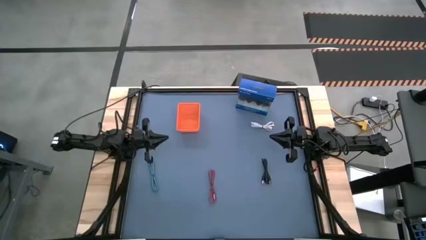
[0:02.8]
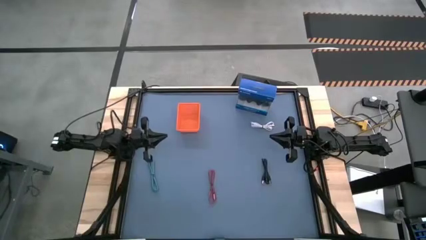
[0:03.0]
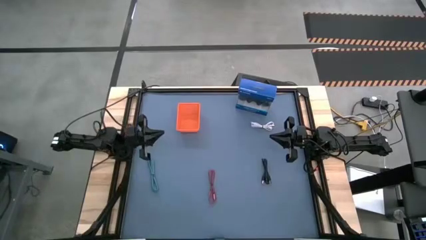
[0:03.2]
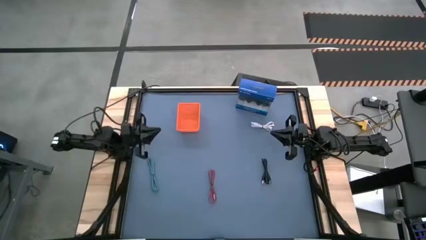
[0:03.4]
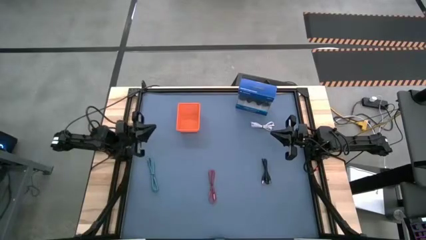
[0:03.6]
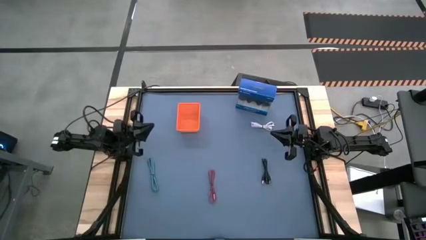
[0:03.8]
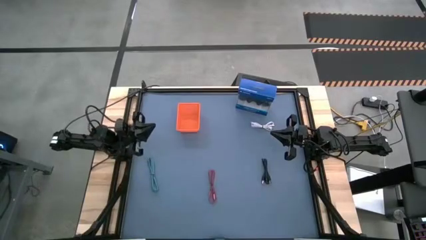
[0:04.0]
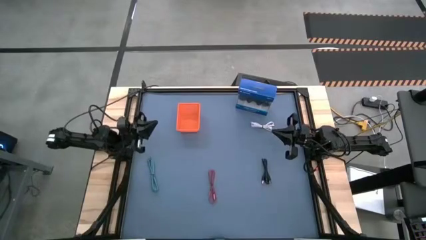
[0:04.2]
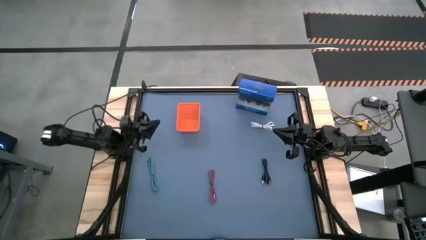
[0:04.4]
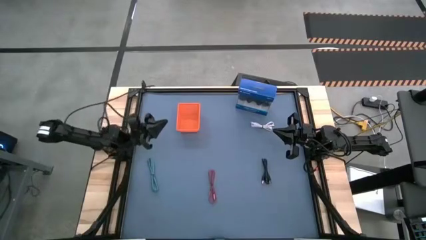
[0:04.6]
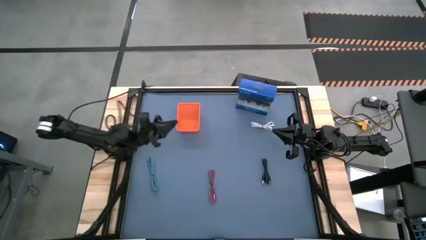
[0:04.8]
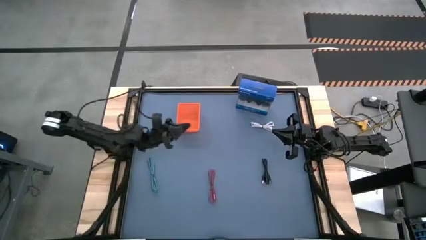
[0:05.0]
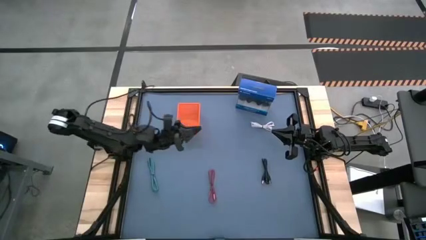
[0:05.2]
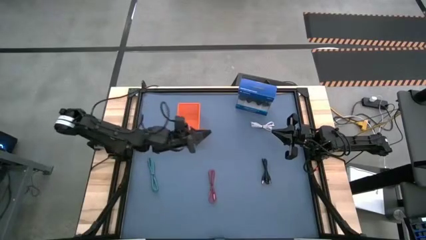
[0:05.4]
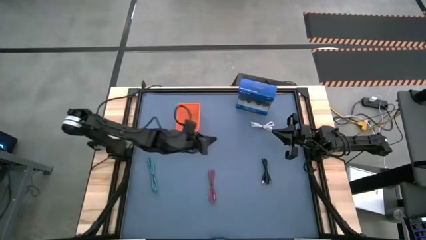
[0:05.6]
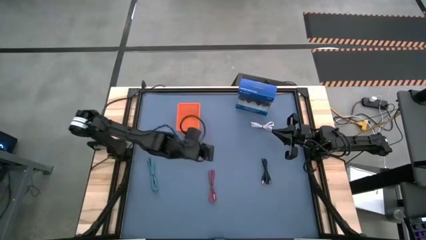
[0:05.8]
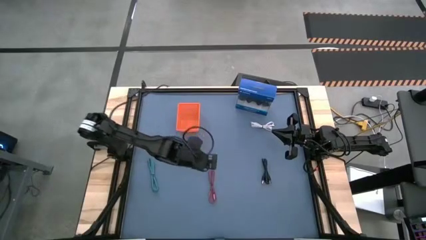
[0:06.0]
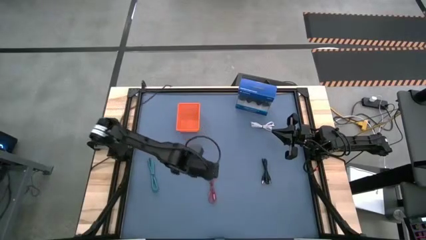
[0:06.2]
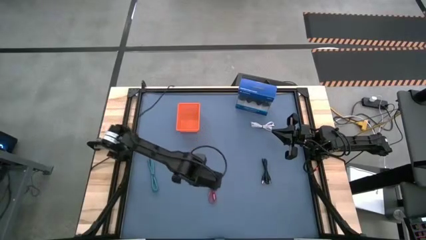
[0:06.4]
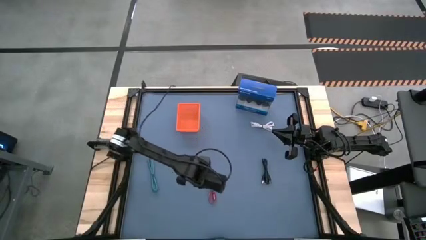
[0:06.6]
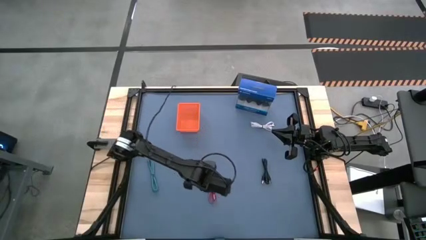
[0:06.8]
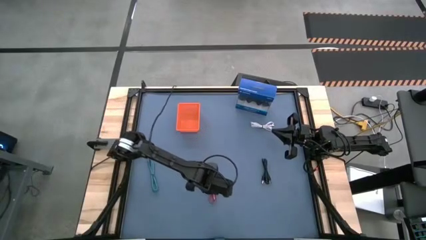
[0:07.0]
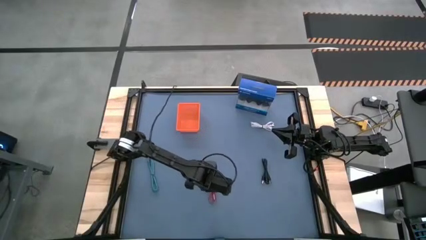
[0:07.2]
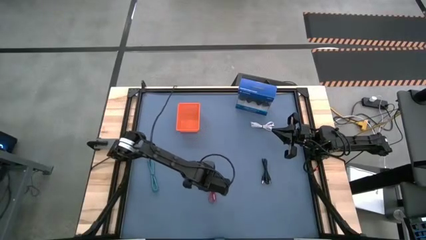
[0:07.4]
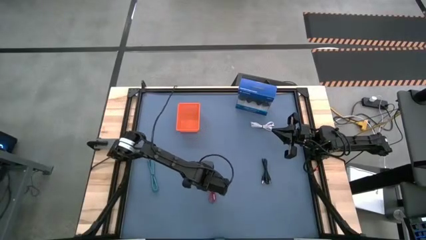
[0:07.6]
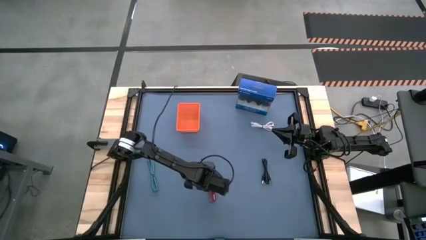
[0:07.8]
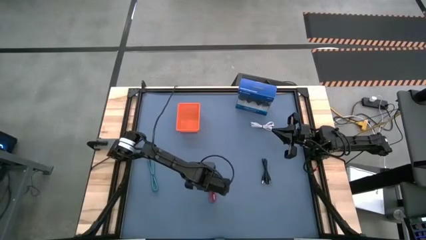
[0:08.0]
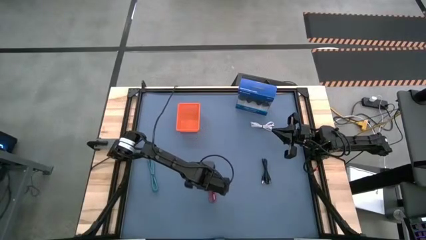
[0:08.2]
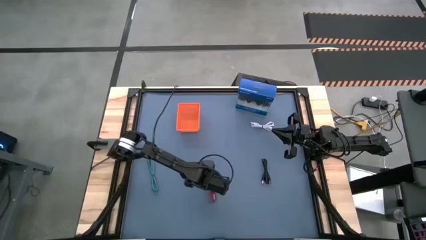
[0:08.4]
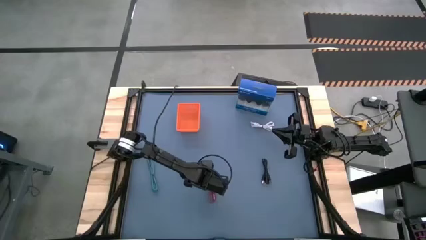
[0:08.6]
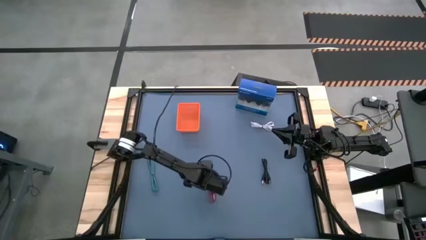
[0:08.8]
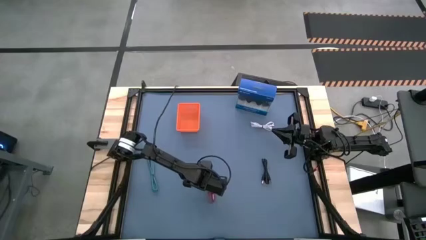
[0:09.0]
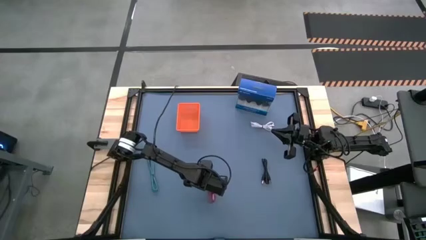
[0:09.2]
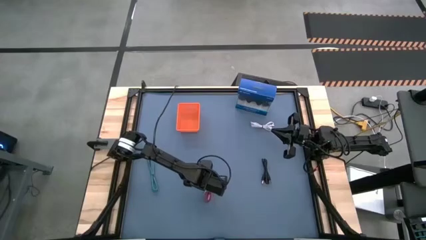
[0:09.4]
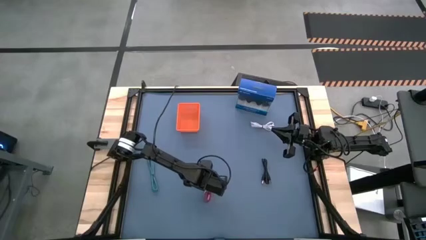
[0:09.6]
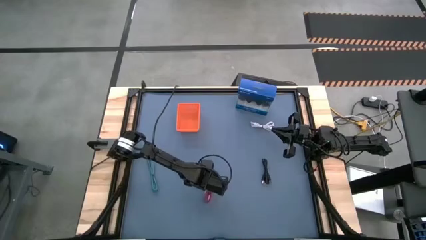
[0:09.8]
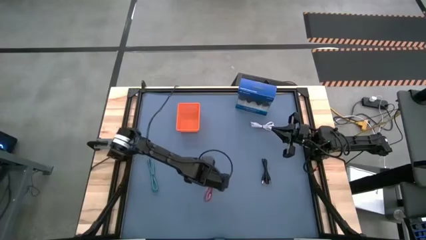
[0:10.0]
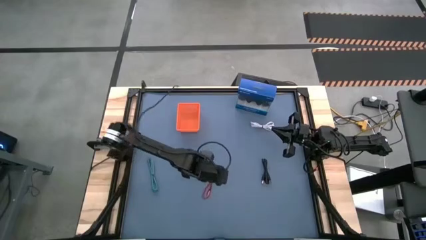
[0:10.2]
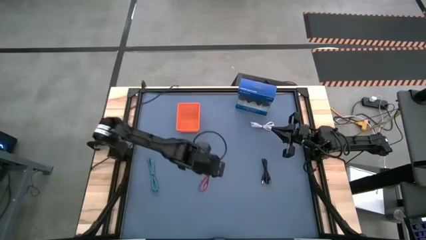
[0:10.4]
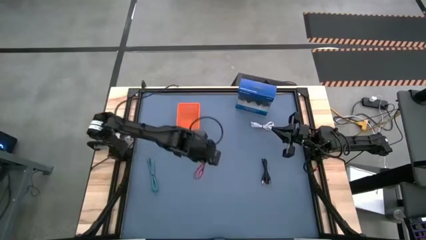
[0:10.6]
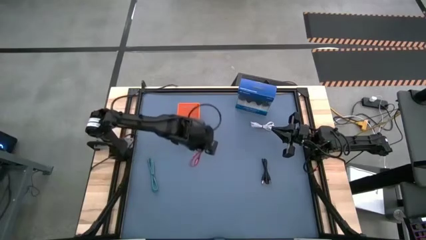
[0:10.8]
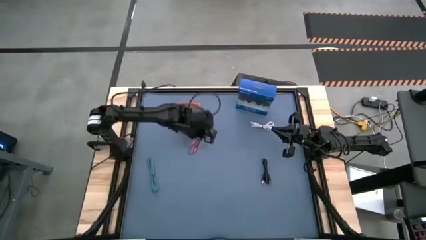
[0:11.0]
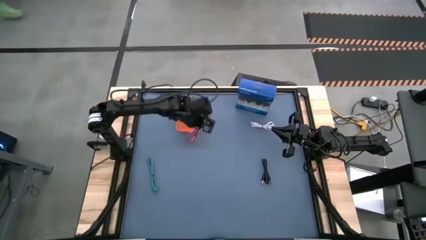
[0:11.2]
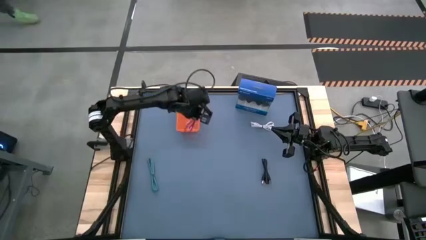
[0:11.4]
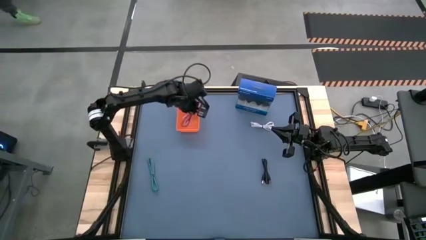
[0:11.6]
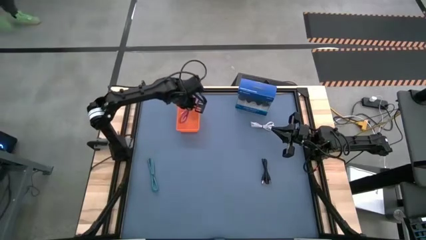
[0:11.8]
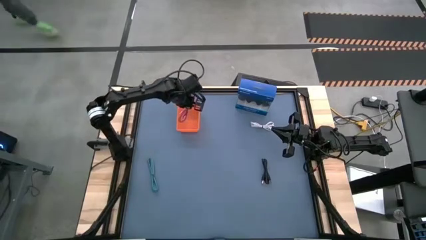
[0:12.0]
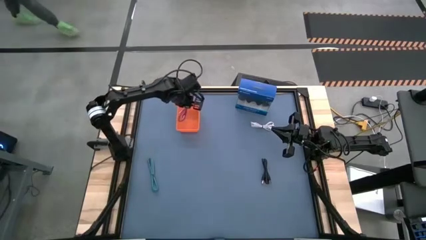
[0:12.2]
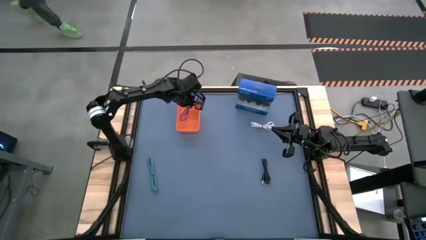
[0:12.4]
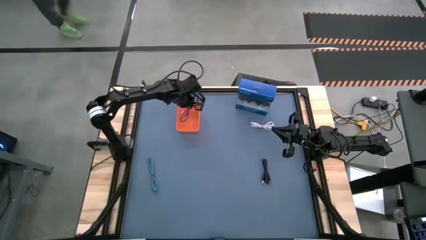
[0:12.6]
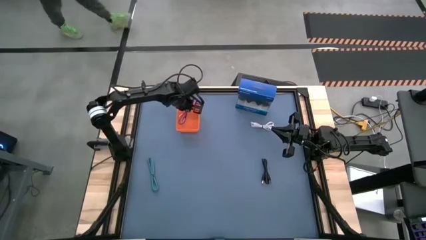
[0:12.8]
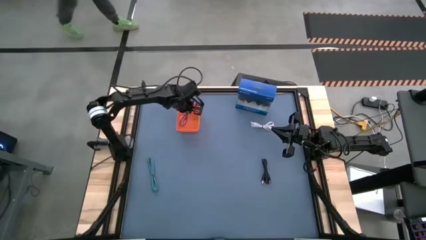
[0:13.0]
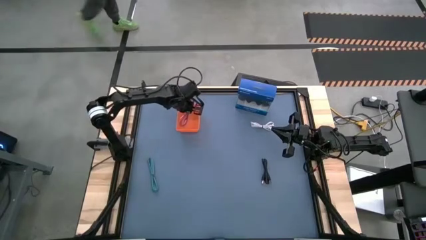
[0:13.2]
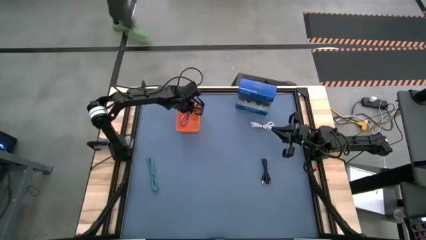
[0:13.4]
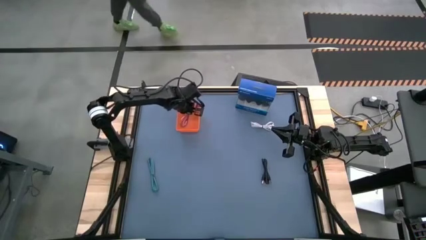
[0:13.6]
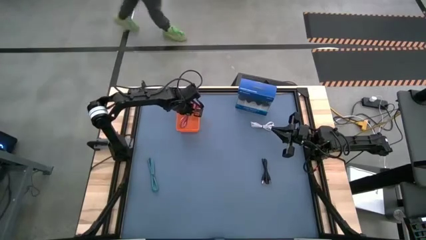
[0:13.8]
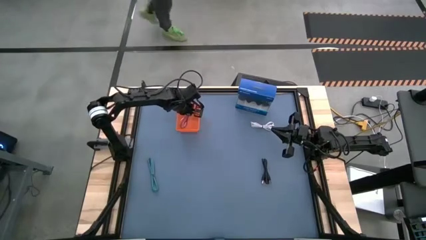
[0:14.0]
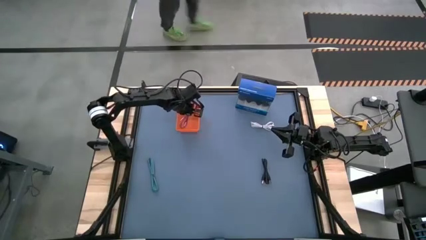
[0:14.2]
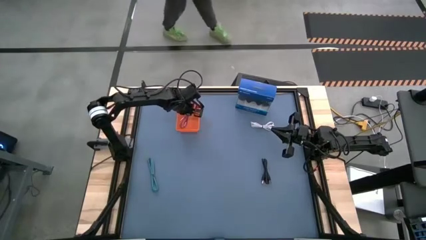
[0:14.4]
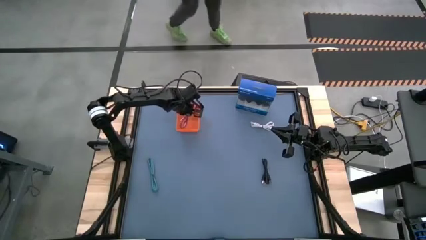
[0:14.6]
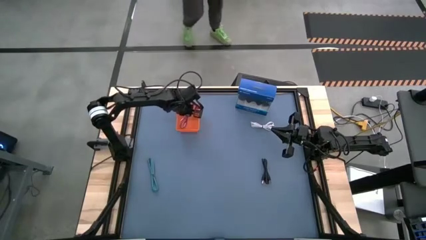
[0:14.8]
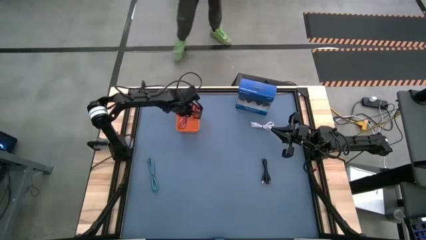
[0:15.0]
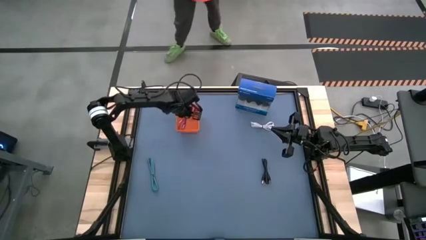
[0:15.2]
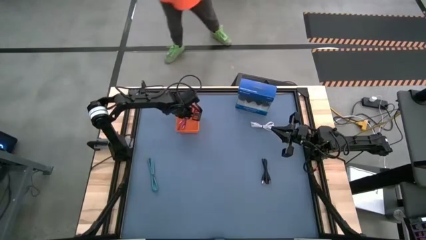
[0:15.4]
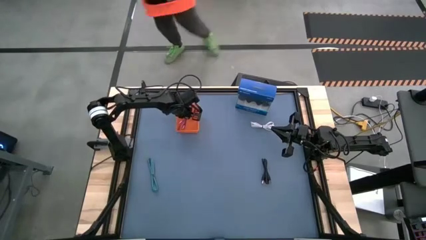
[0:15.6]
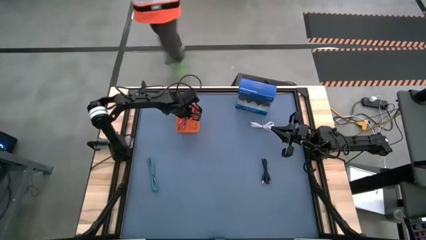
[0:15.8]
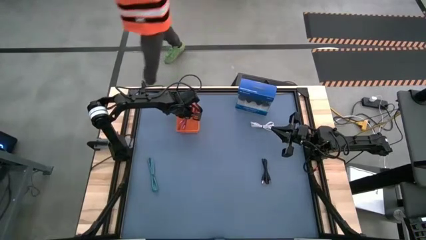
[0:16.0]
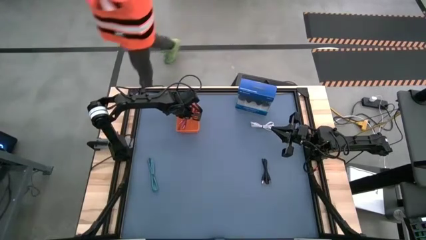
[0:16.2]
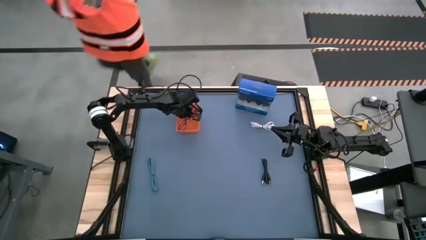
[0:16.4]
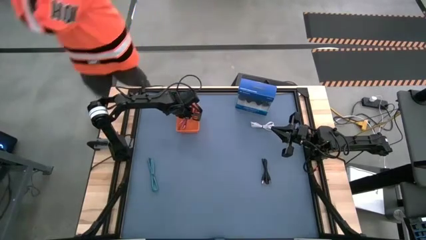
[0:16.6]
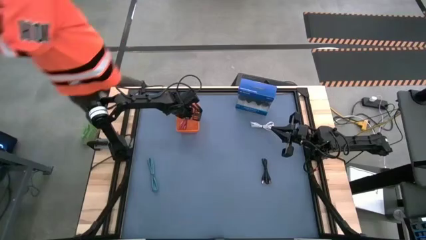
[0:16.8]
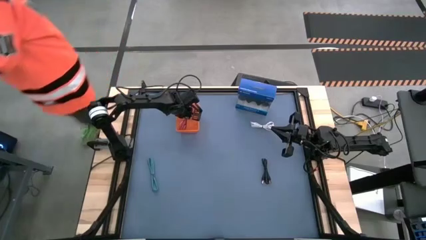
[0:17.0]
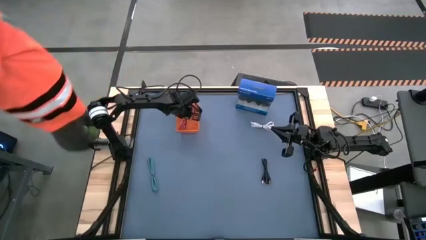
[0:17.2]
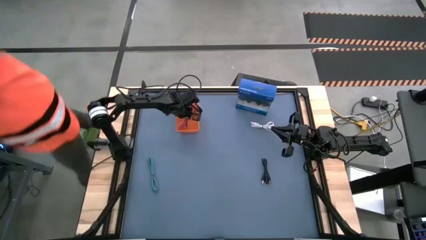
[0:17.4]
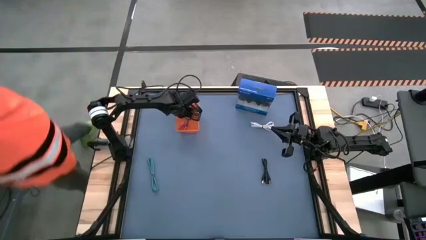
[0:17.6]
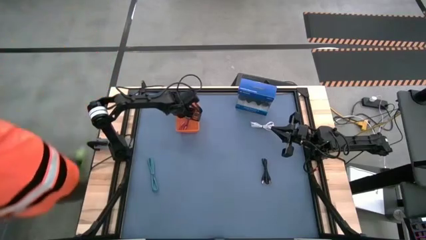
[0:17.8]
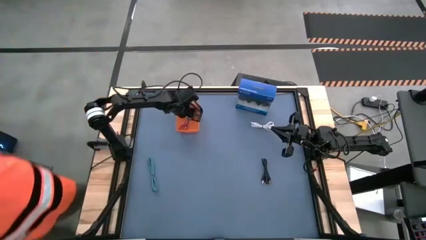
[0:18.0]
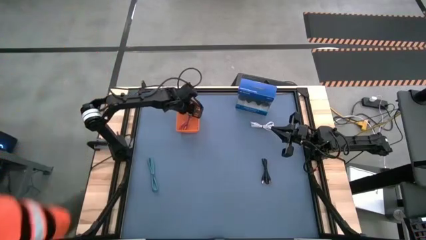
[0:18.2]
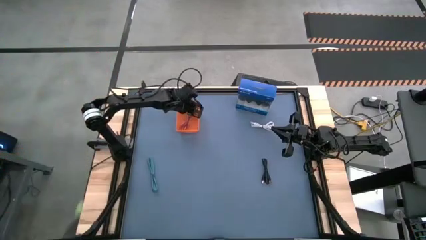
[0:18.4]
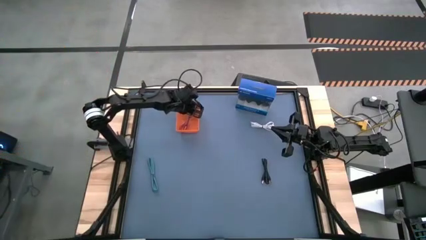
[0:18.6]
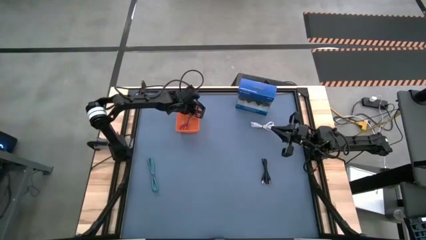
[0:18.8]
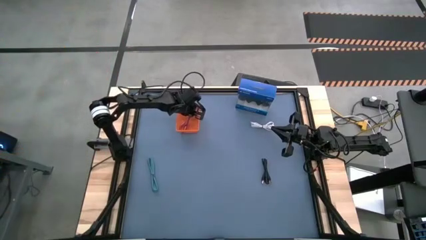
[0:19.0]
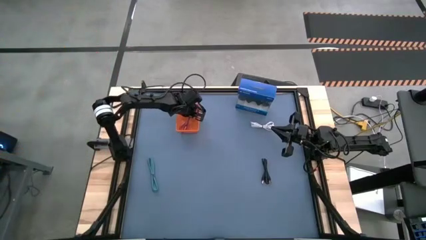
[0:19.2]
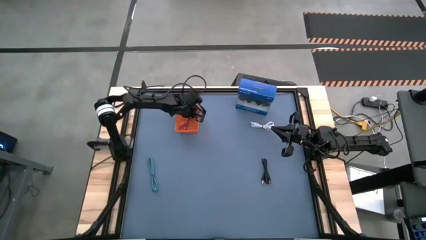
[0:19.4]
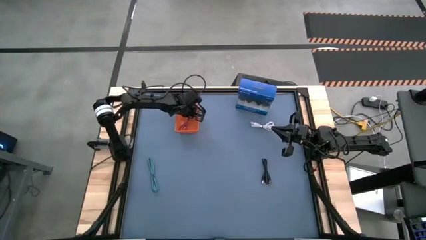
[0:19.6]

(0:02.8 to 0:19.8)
Task: Pick and place USB-C Cables
Put the red charger cable into the orange bin
